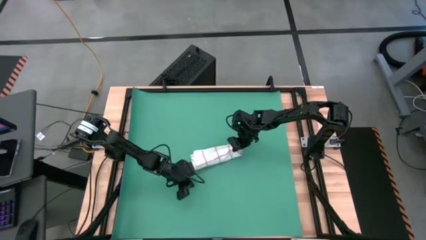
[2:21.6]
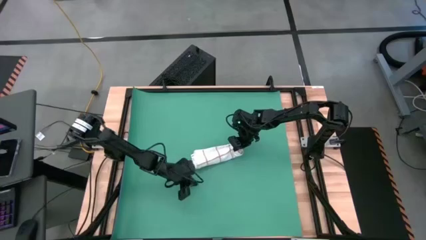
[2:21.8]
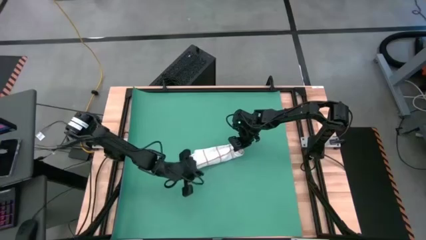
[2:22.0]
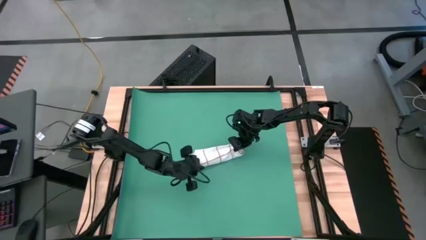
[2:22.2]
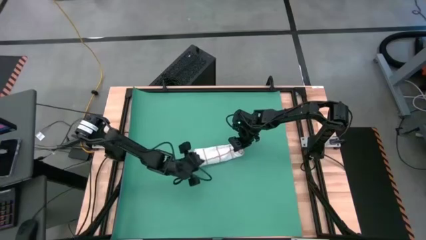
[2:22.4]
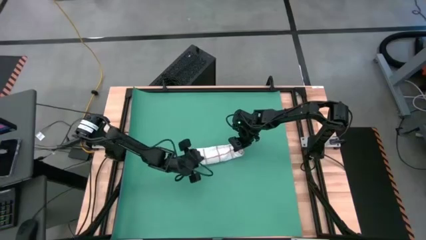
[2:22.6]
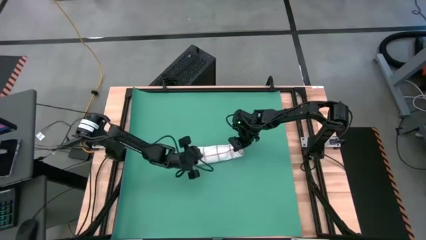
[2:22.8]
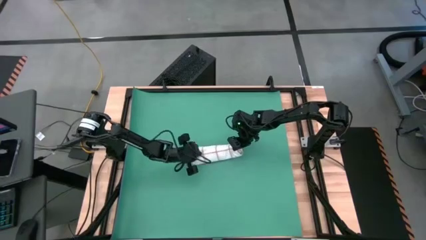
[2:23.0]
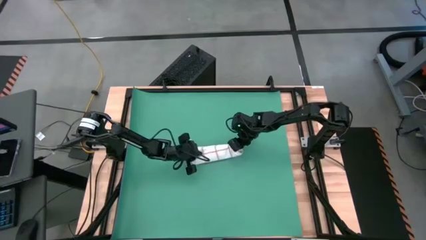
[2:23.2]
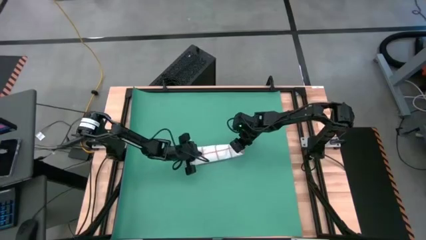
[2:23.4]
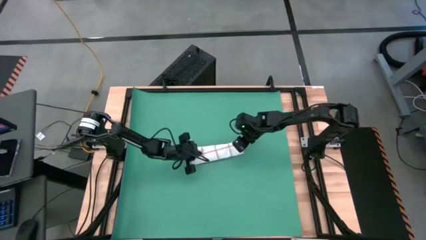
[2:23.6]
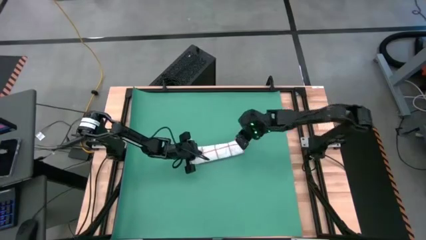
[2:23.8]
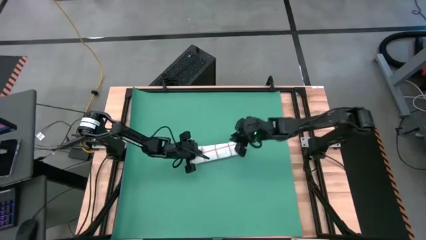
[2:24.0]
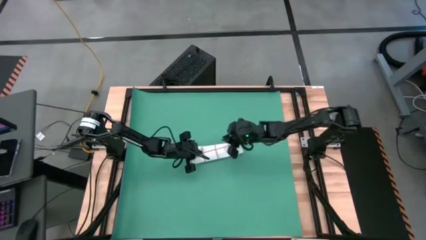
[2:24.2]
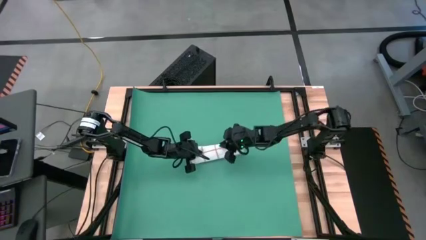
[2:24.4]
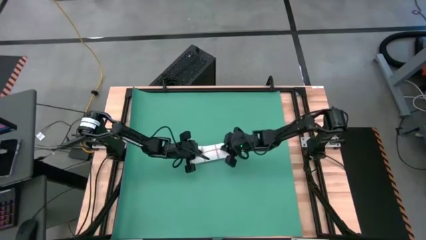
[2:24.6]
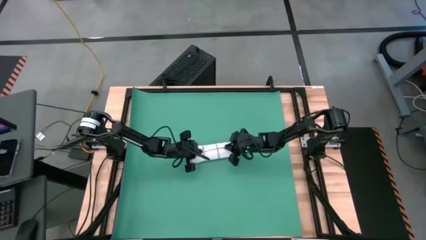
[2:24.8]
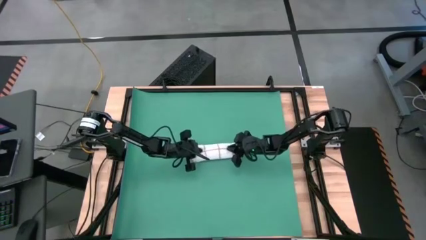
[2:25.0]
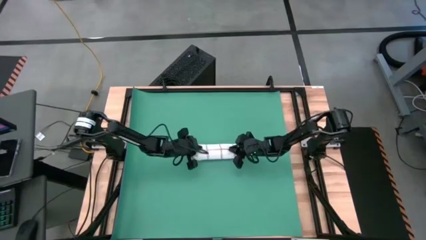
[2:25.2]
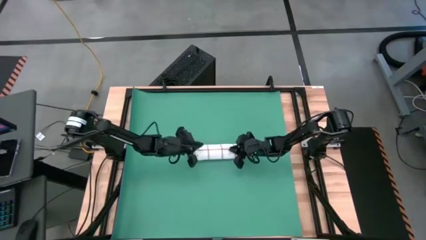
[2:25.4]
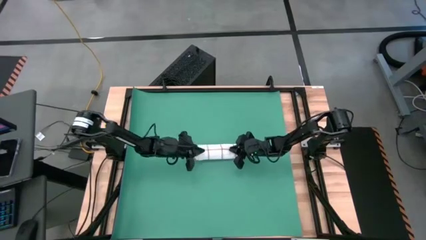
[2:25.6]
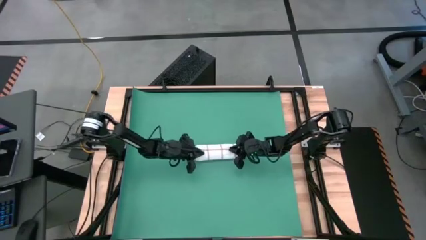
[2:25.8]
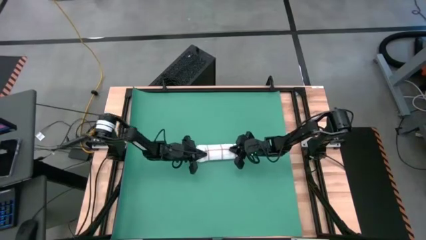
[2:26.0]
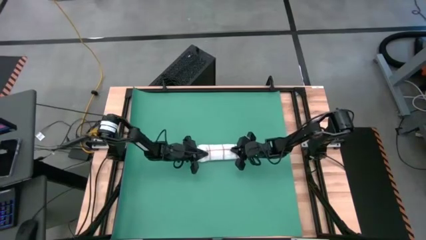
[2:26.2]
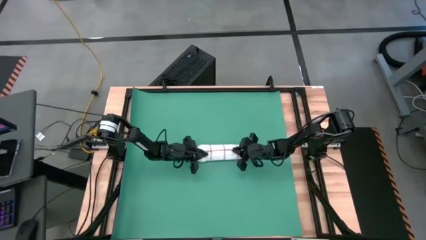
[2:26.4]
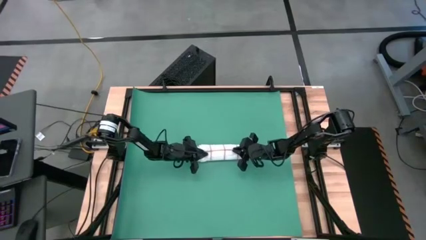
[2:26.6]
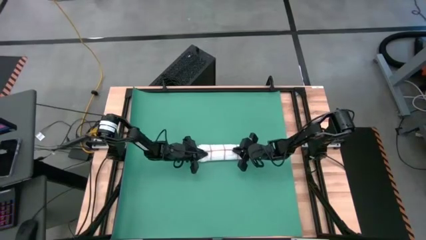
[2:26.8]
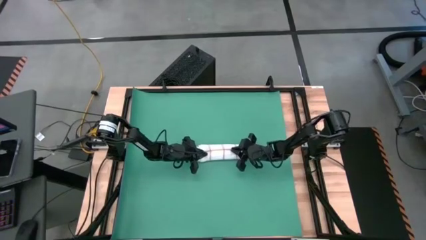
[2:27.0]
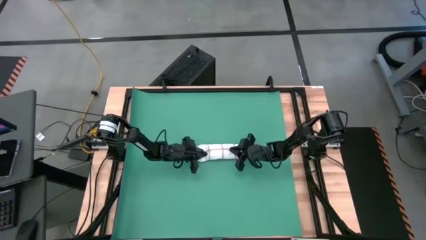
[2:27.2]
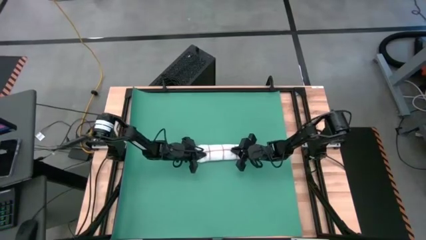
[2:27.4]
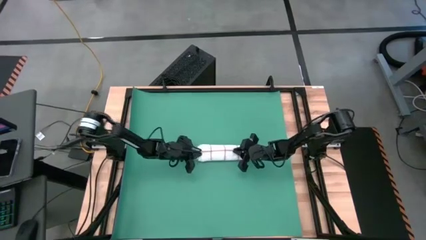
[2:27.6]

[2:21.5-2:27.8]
Task: Roll towel
Roll the white stripe towel

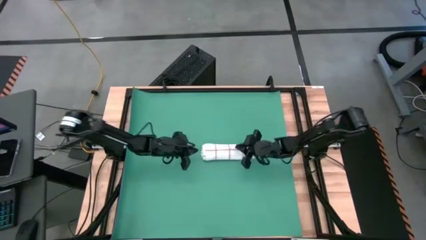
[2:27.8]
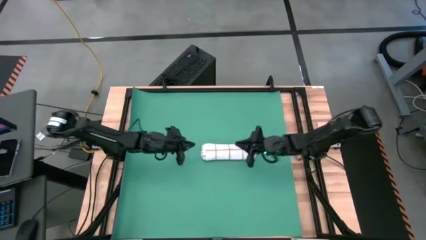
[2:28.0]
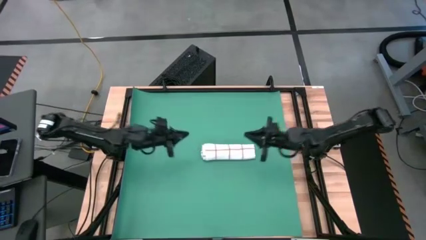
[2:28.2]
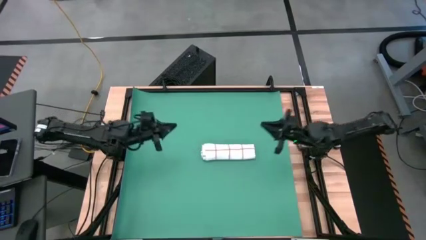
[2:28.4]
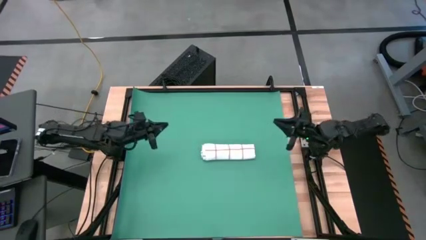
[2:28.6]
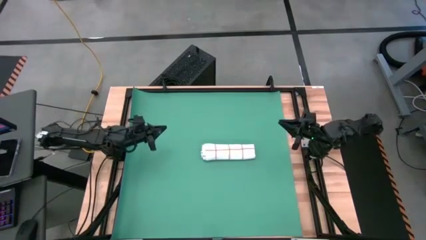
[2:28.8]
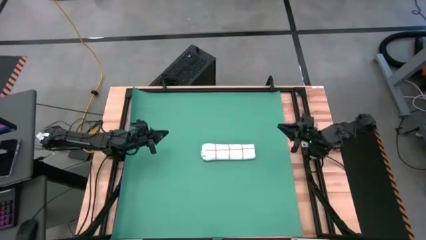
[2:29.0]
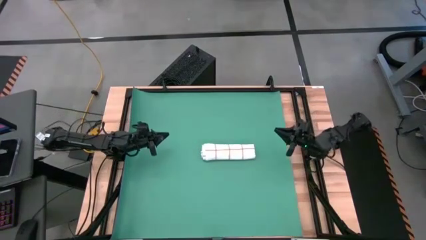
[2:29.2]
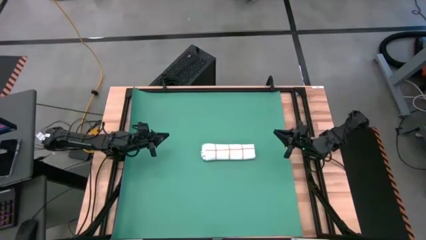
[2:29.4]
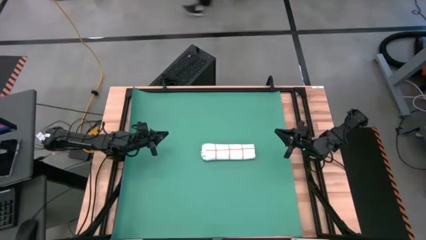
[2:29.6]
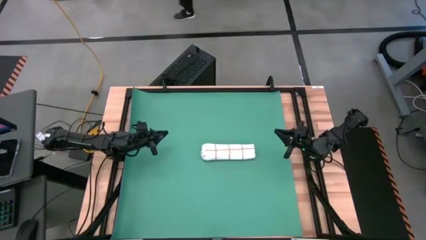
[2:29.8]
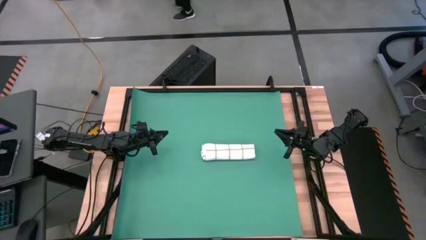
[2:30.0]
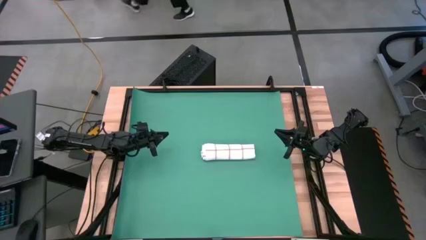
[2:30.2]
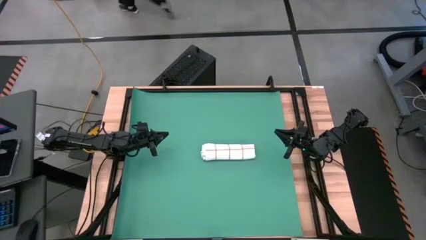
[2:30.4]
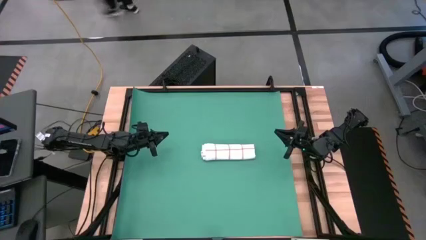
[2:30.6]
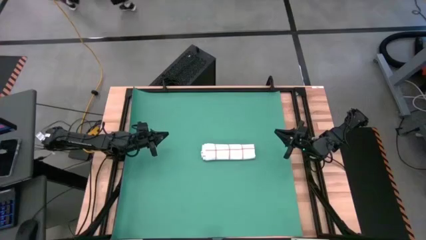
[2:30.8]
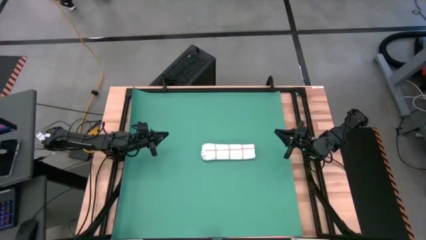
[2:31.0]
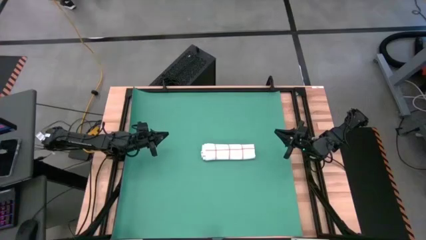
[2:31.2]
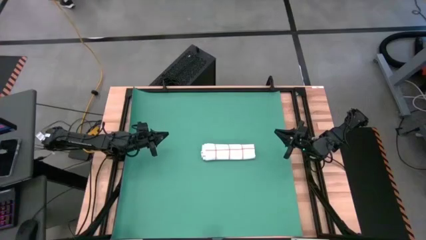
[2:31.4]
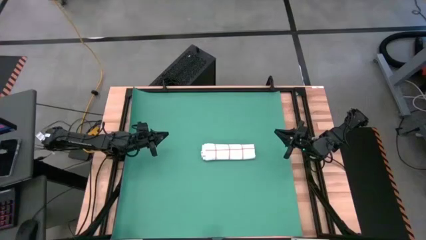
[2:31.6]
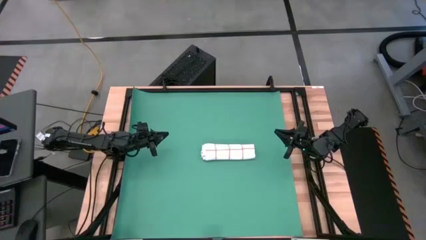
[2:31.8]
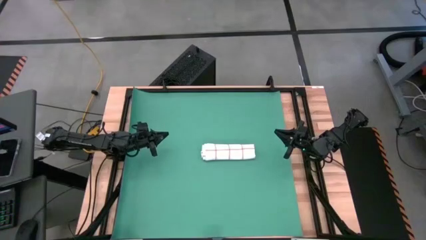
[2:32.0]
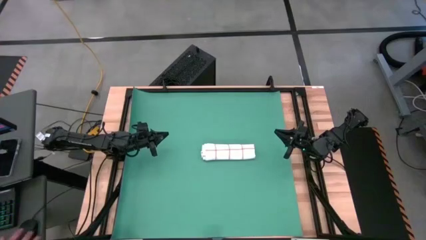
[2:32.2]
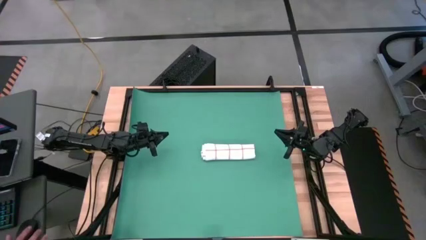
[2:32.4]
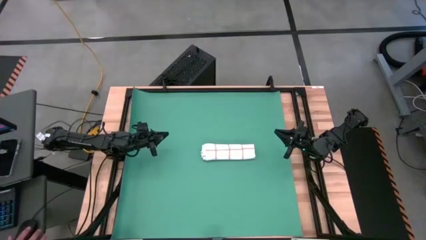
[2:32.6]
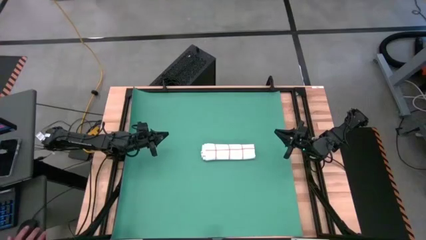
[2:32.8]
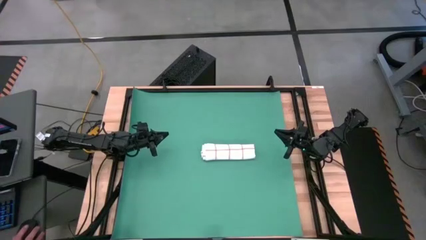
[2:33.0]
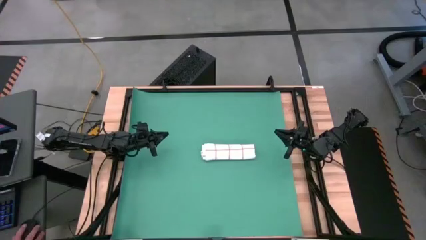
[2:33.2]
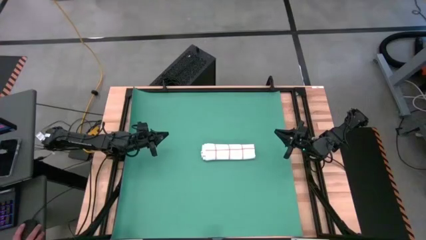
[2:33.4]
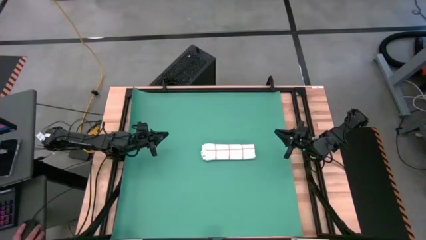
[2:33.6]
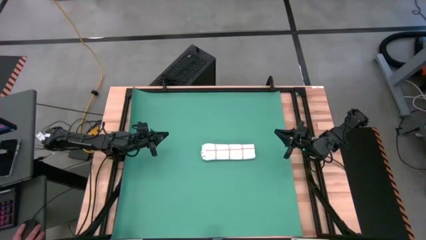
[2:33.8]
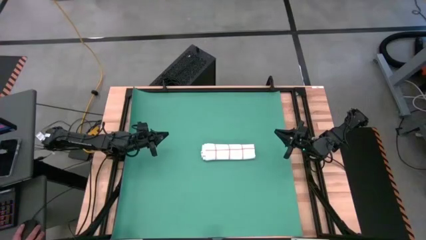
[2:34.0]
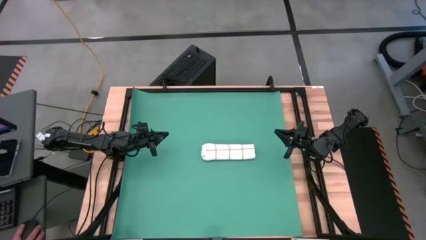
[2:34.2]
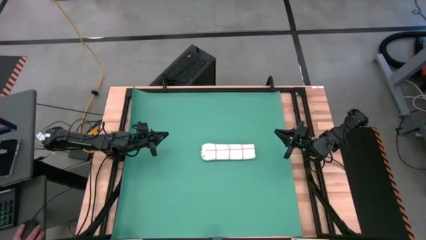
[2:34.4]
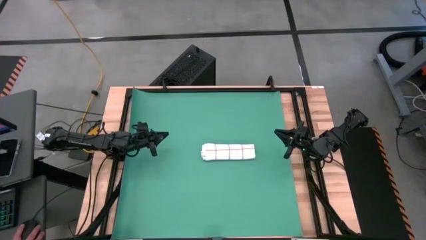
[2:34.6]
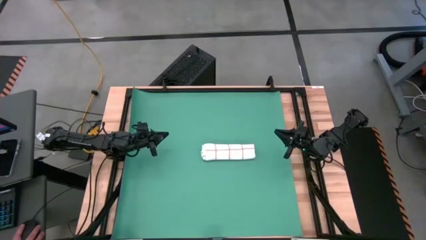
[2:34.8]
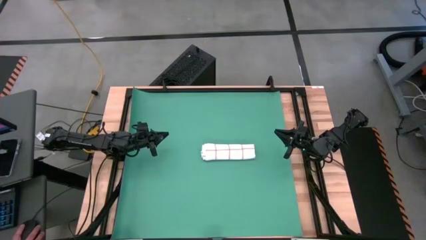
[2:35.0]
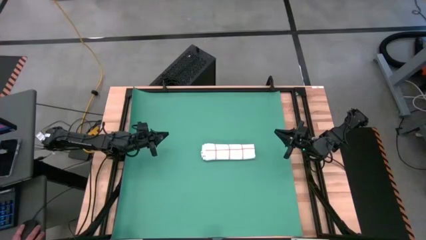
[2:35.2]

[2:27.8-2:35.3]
Return to Home Position

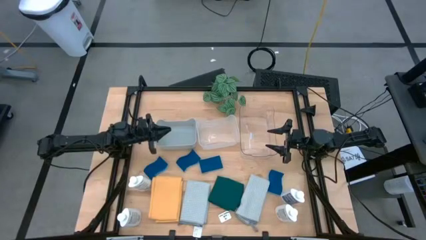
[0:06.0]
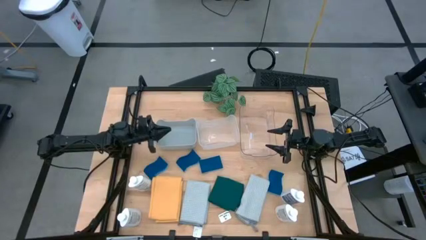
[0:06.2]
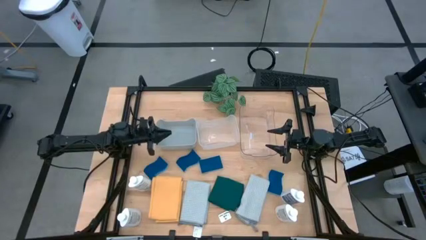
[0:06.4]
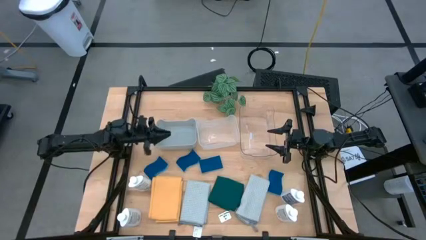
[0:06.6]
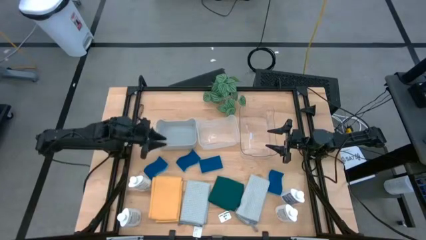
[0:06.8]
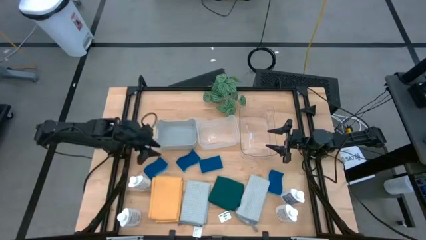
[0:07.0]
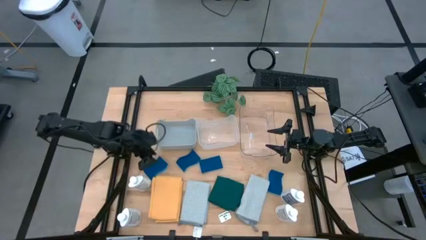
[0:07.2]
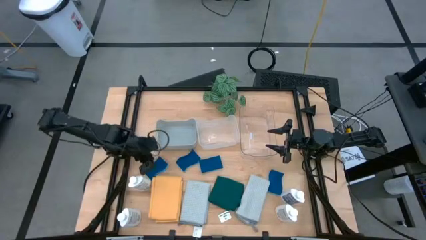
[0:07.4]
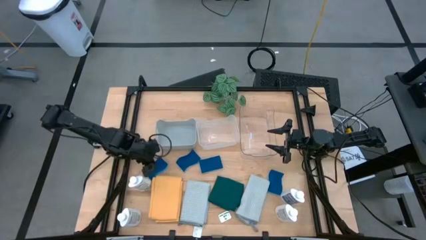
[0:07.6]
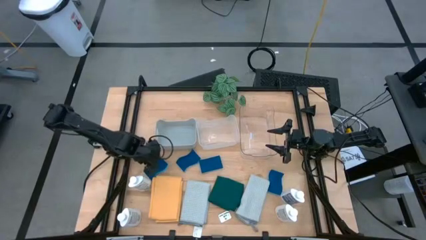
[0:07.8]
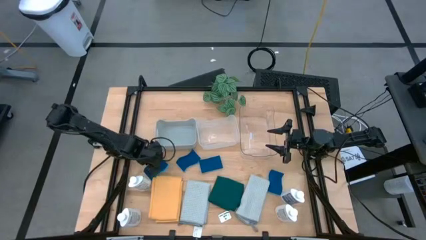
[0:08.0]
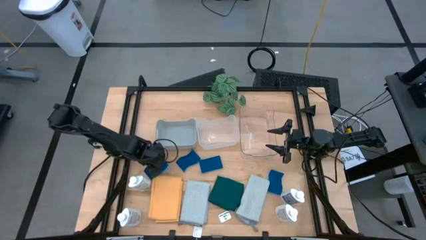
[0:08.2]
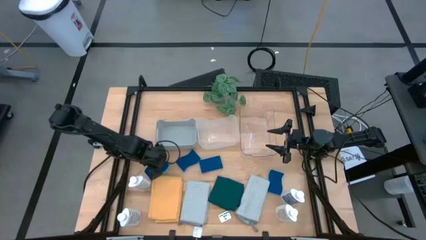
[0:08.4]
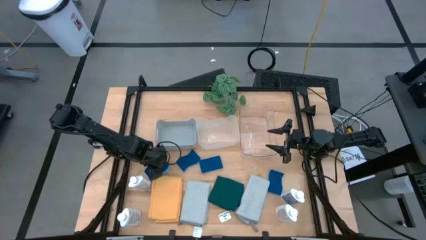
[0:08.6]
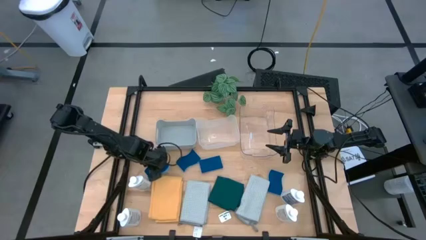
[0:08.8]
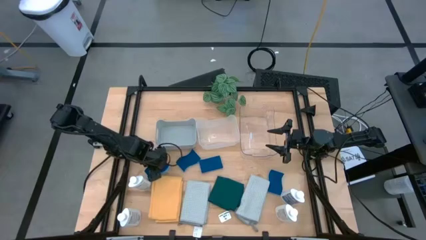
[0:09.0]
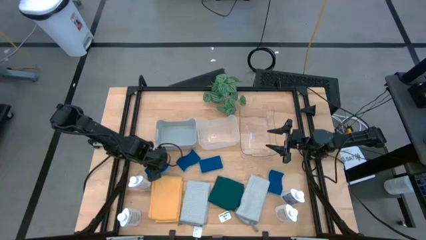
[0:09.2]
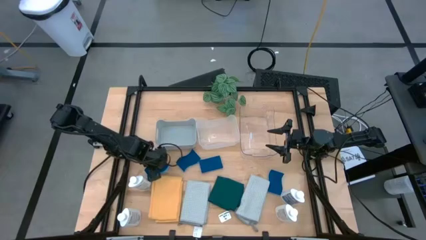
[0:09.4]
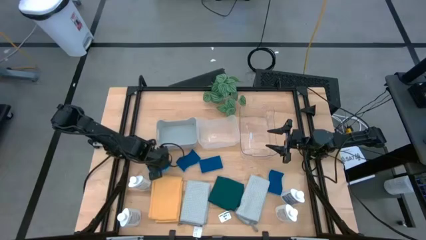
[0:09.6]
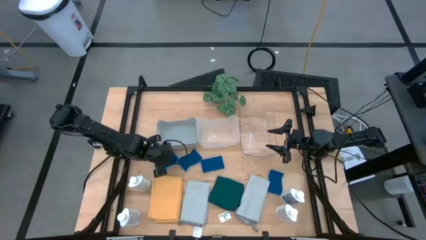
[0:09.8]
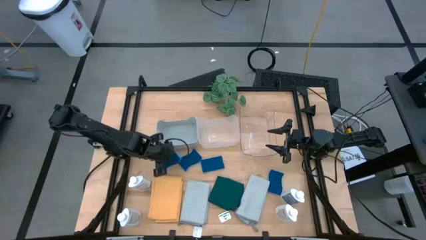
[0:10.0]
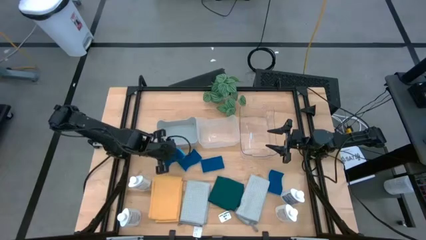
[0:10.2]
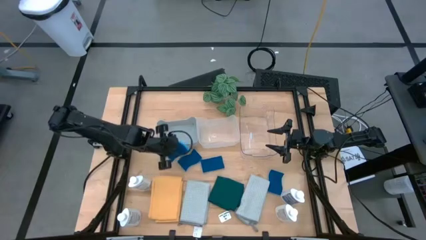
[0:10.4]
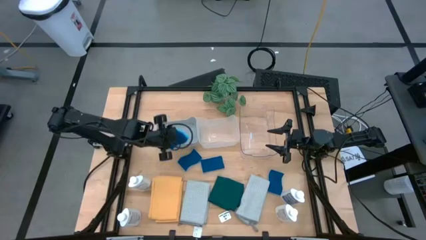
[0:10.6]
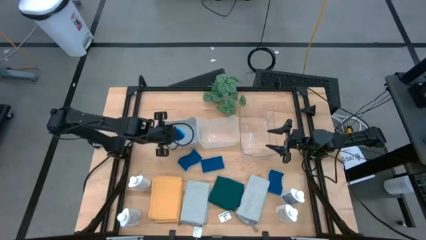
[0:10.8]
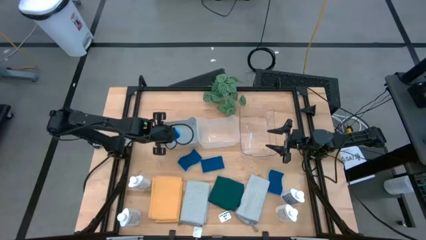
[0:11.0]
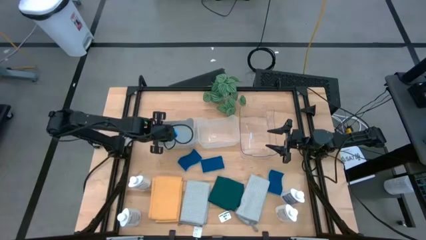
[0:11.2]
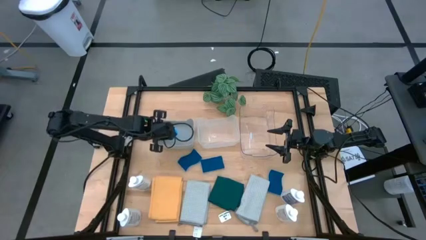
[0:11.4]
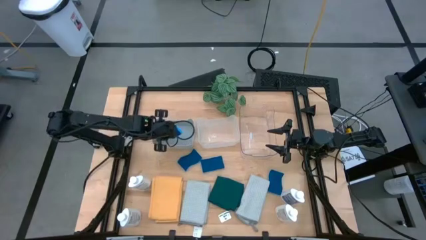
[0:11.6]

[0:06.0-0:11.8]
Task: Pick & Place Kitchen Items
Put the blue sponge into the gray bin
